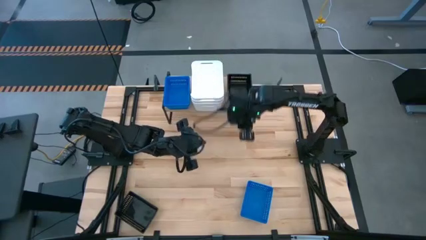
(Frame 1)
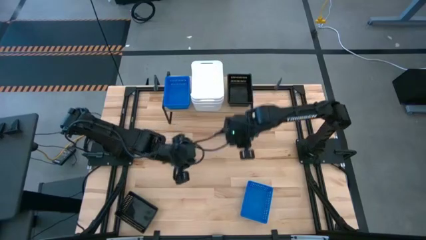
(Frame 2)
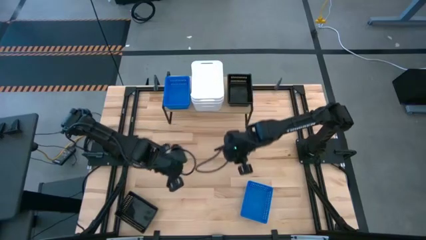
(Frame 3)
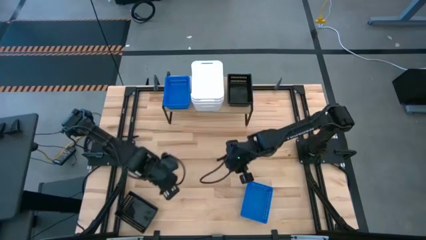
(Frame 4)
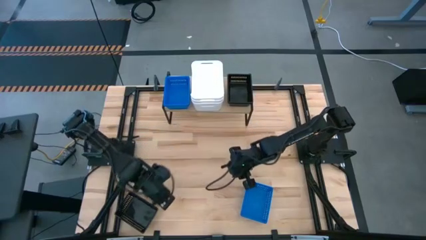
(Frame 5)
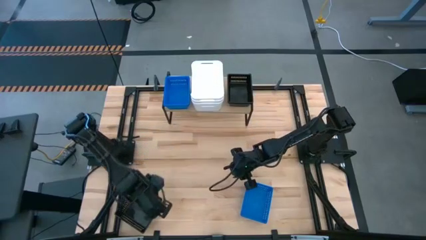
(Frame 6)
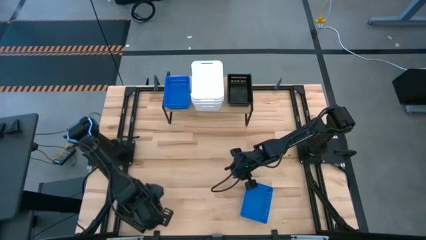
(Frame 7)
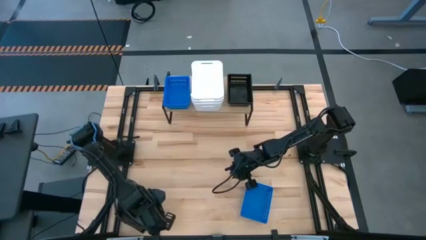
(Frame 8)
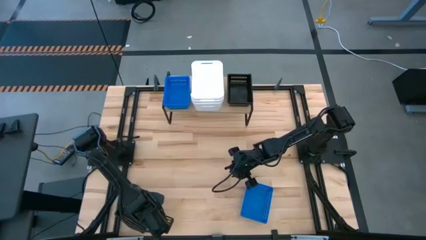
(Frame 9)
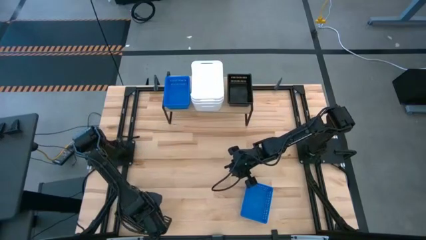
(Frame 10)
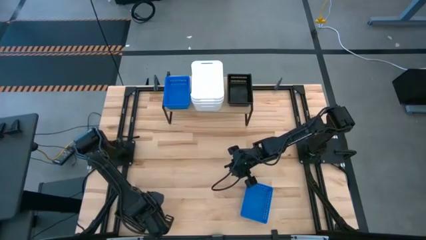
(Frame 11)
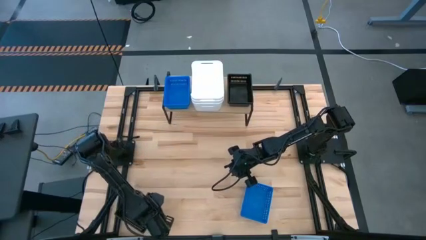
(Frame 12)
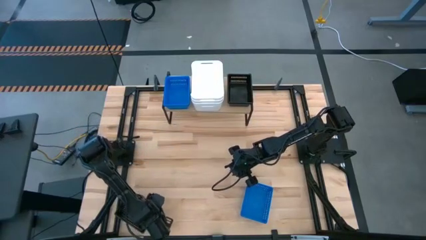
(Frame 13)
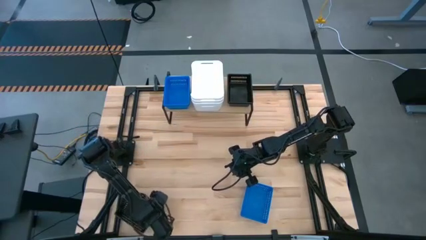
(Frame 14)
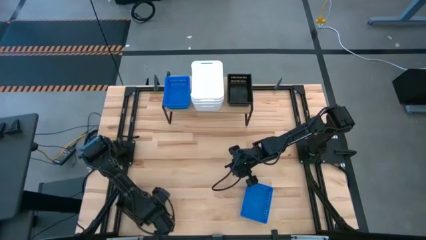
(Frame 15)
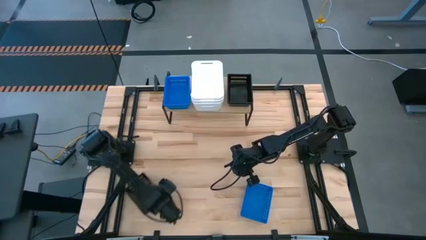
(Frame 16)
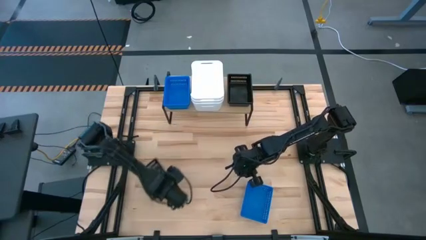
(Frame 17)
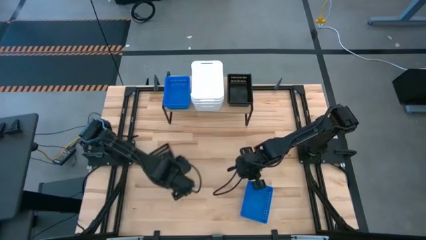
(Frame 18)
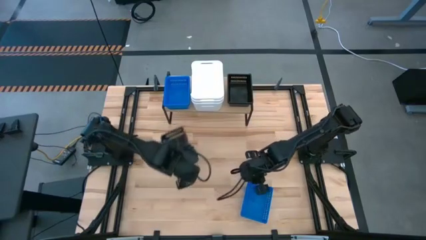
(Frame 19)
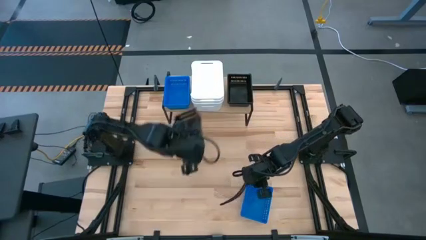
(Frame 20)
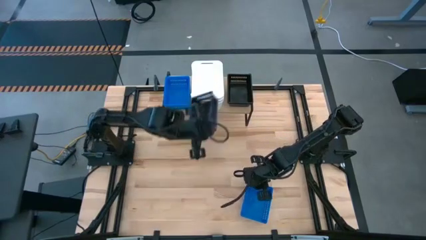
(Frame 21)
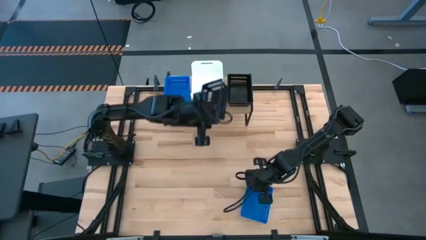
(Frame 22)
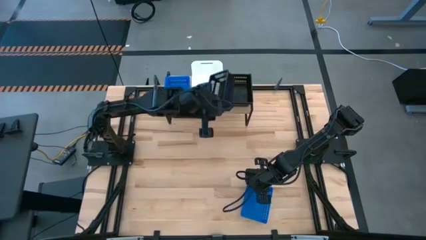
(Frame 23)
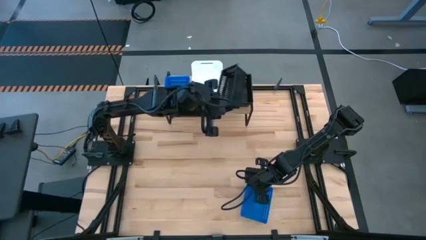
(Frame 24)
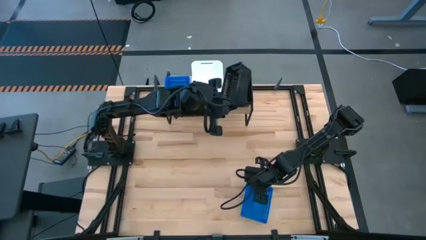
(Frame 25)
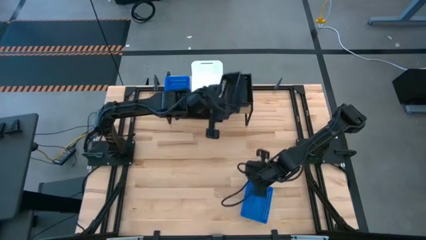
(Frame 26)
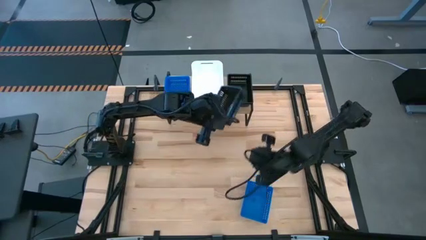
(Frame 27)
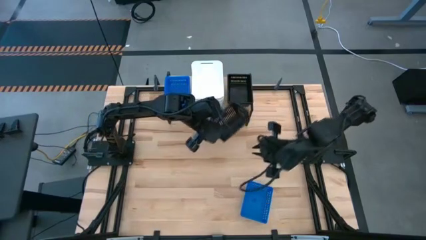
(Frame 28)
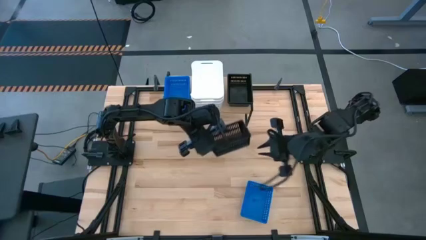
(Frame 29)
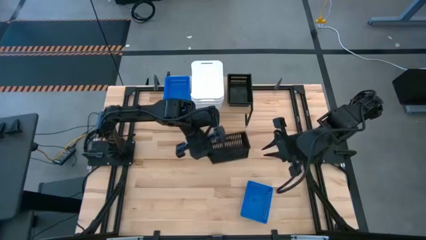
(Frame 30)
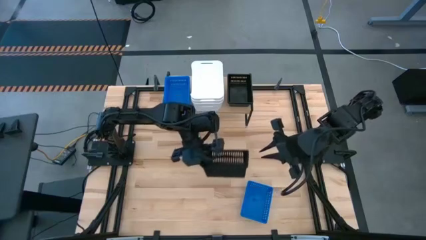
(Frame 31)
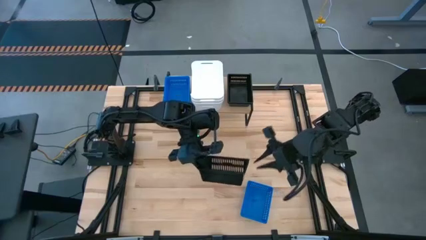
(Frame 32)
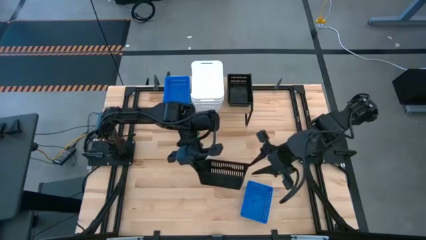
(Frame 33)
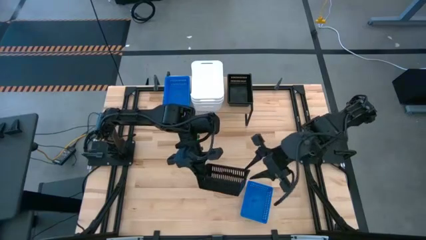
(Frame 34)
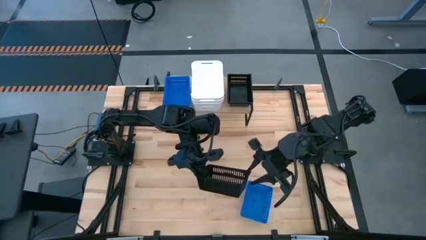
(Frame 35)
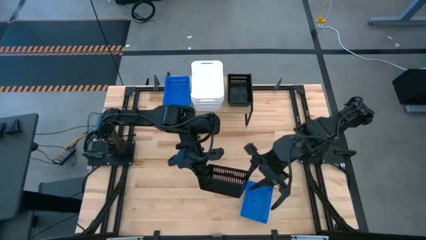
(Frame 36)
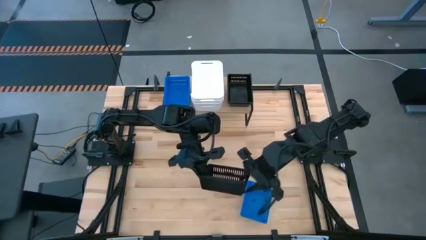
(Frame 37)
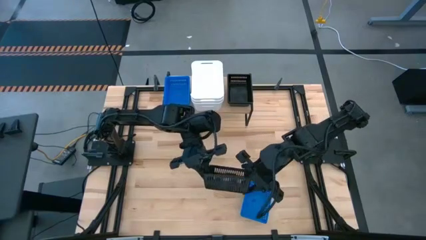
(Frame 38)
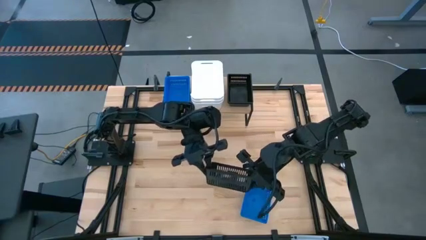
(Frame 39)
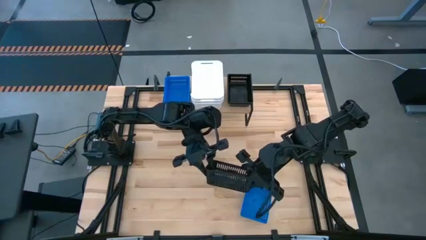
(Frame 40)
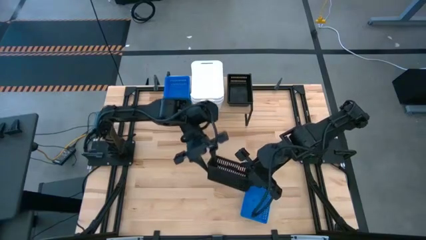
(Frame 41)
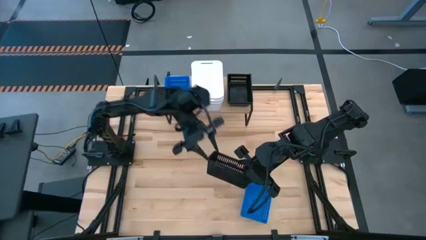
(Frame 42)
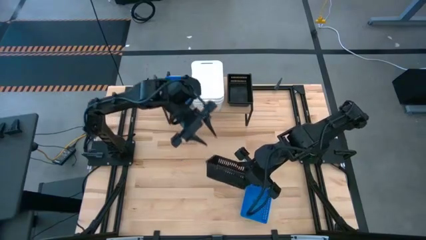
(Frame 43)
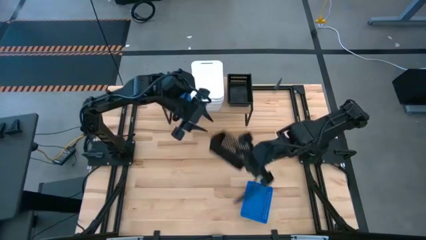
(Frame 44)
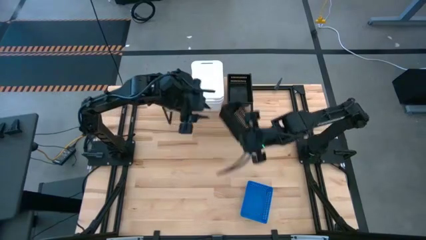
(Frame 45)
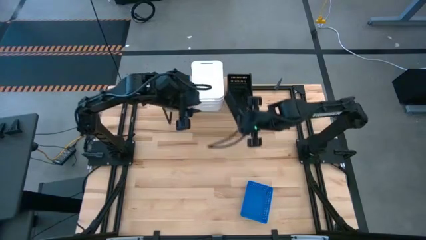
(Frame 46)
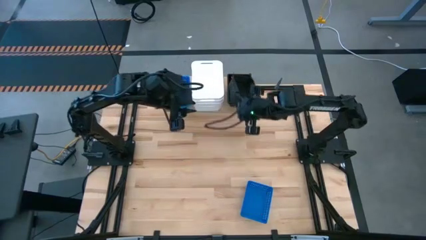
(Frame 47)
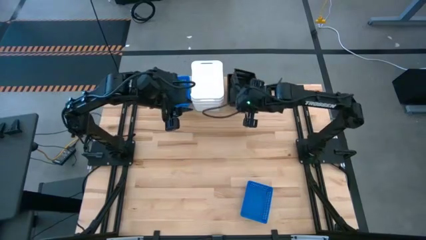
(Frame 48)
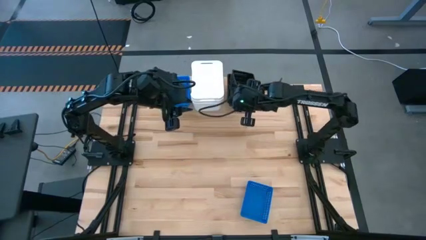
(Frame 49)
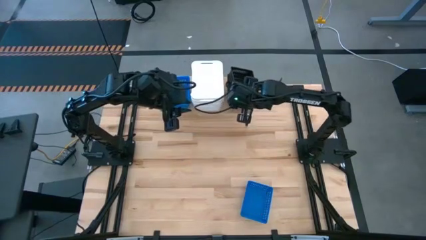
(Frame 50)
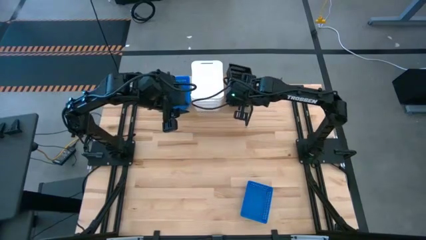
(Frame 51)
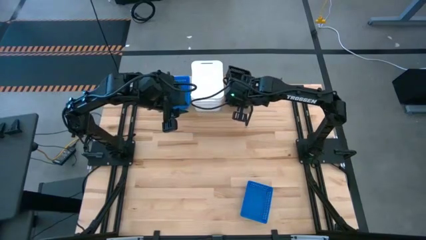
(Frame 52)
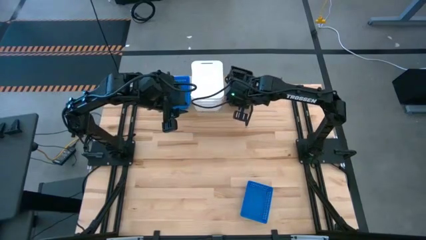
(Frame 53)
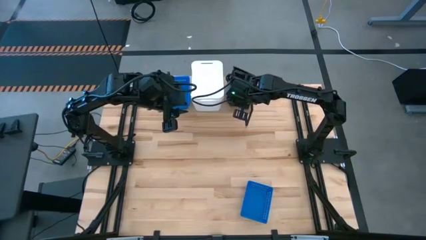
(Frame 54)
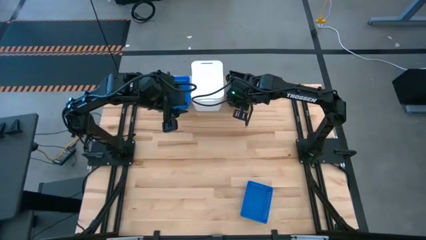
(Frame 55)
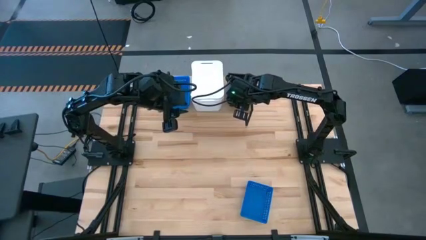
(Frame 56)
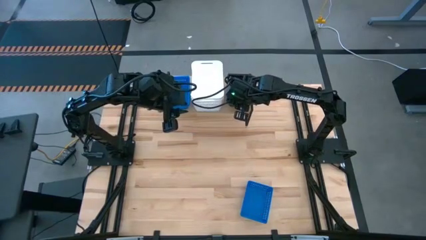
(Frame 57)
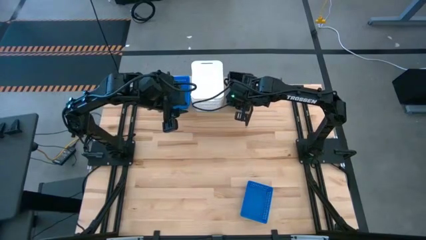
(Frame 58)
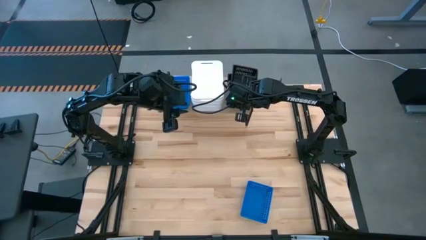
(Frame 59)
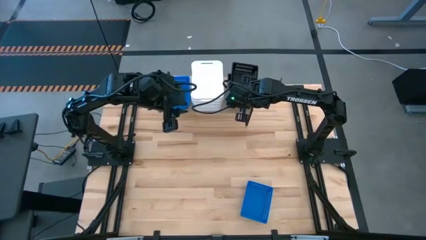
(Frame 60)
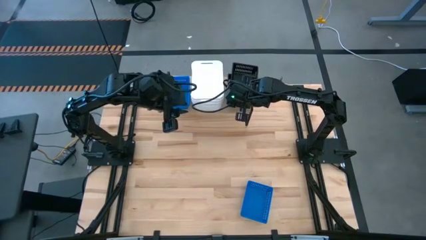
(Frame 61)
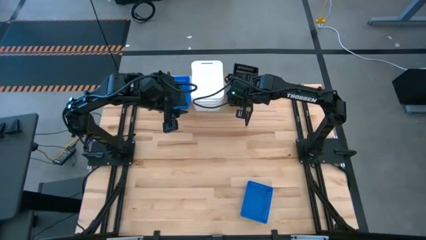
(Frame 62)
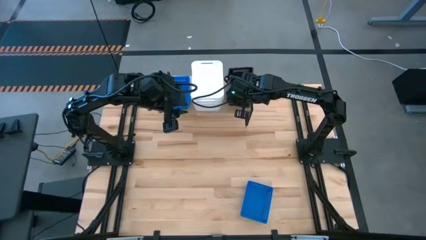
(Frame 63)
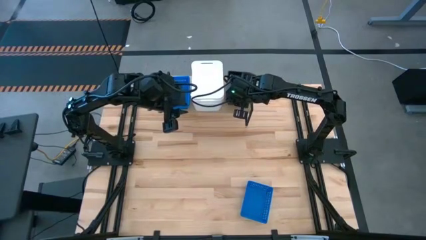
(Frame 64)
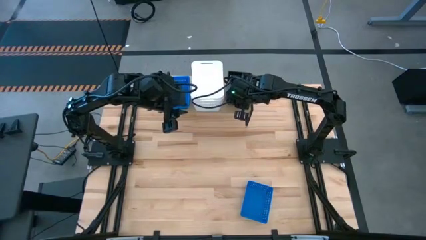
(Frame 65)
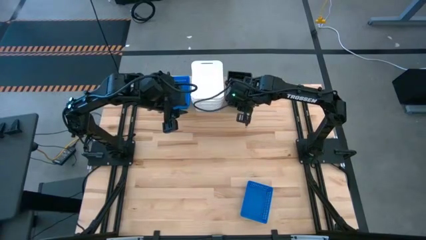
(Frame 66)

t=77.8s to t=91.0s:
Task: Stack baskets on shelf by color
Stack the black bin into the black bin on the shelf

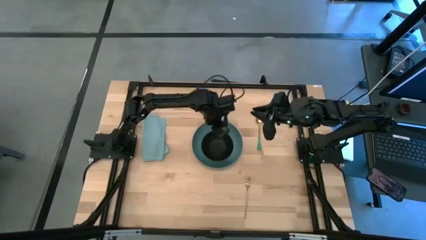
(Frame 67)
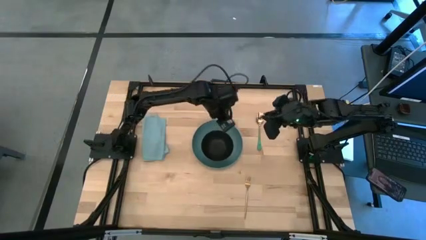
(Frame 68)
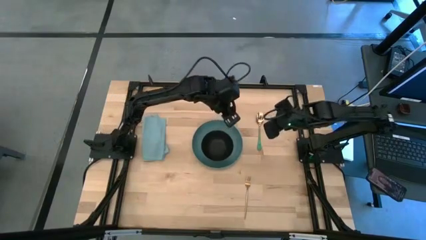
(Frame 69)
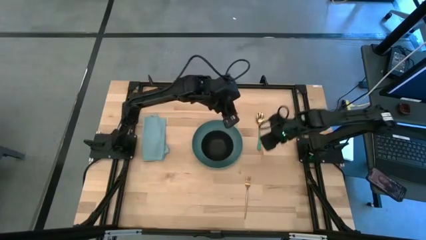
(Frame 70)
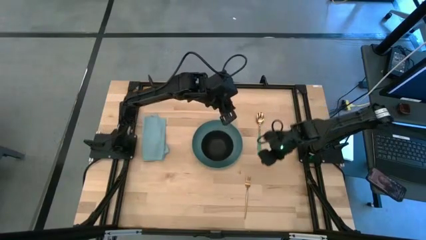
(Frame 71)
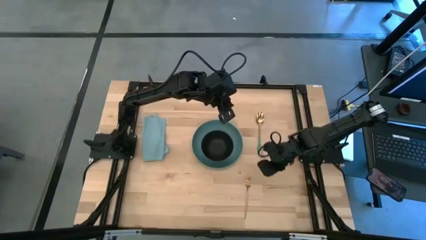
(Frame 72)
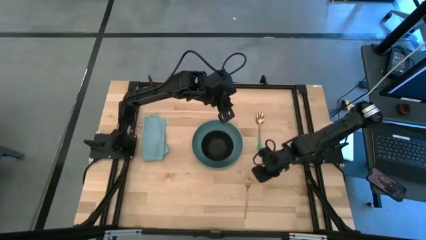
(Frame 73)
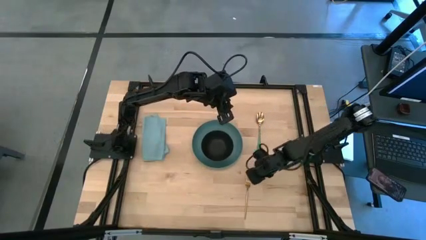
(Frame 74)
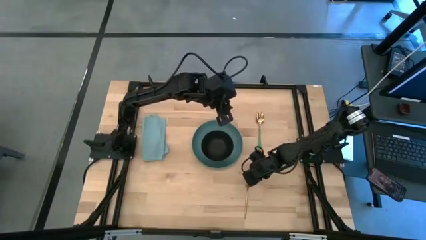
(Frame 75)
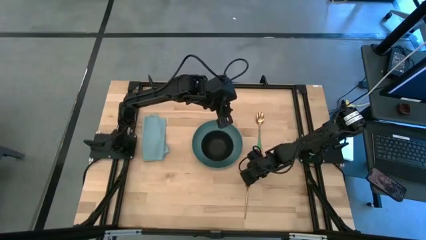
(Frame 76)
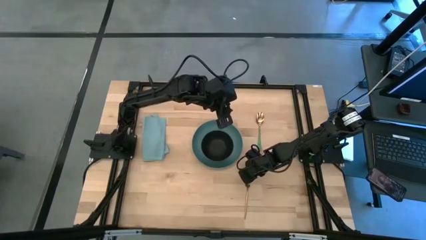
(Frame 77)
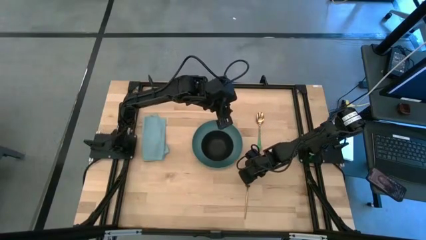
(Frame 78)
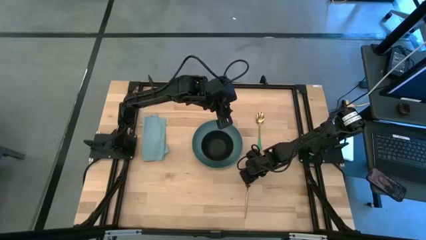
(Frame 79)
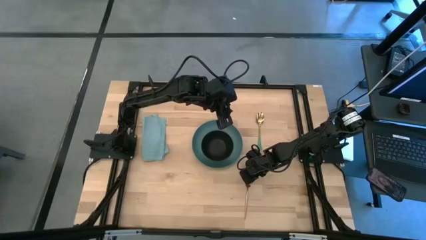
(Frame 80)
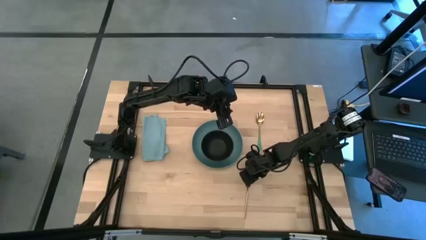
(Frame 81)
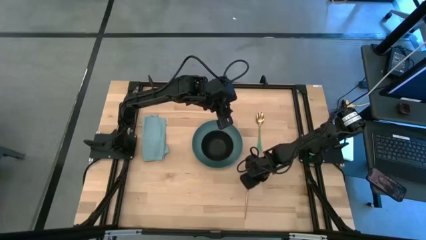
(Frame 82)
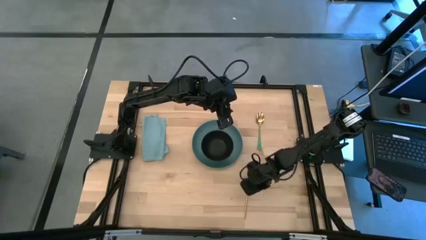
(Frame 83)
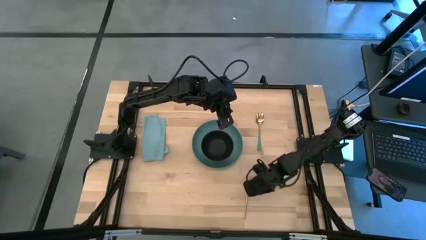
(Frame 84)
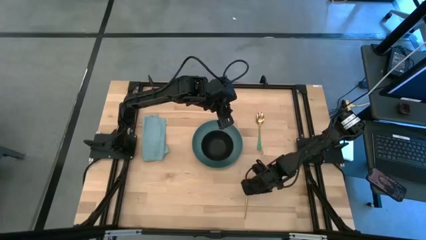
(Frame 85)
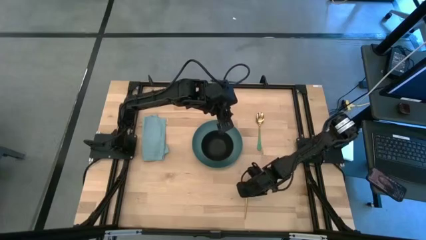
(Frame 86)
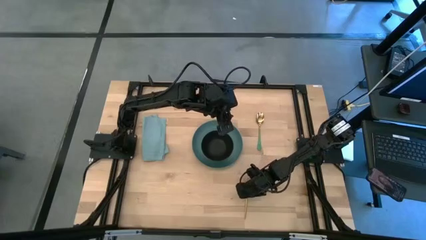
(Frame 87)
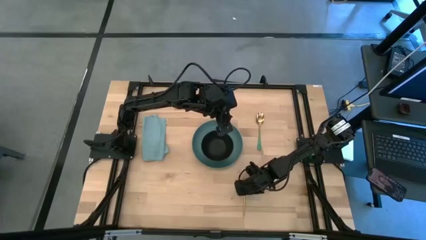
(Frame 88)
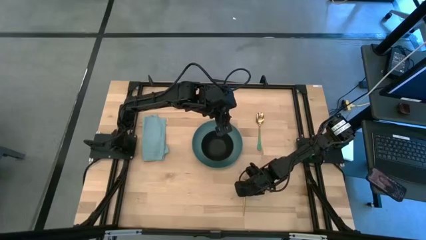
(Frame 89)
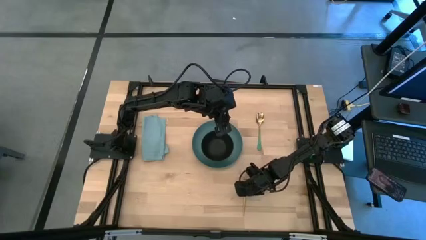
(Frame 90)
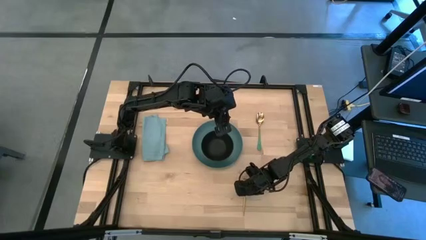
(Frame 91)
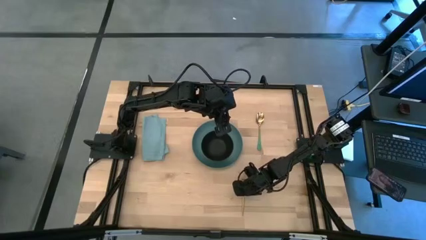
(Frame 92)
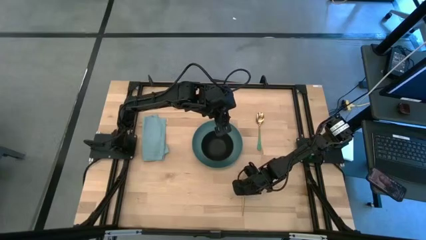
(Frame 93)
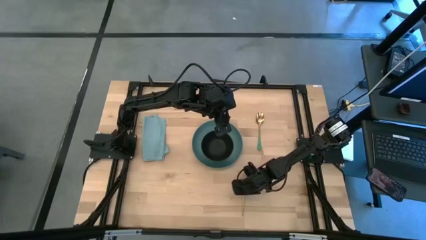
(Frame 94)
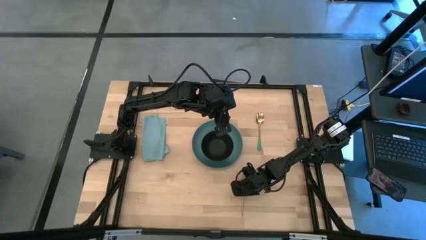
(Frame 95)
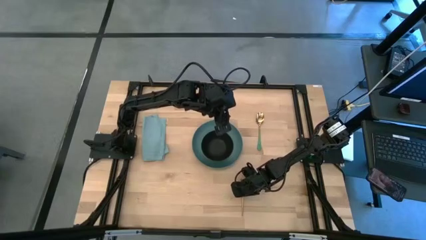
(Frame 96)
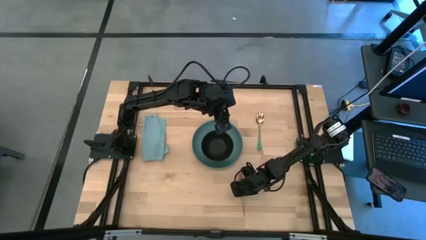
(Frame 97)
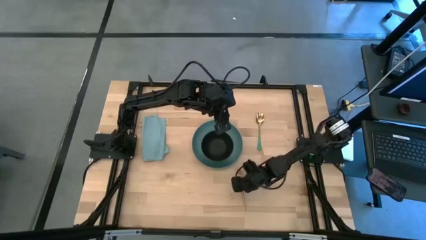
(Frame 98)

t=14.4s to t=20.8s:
Task: Set table place
Put the gold fork on the right side of the green plate
